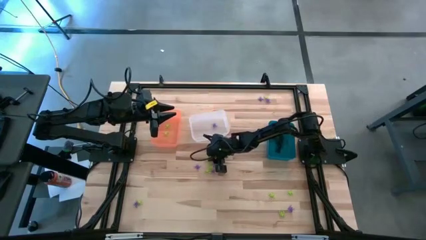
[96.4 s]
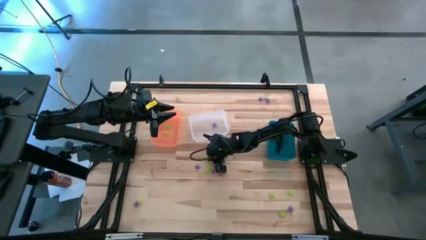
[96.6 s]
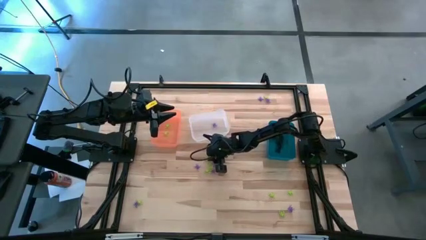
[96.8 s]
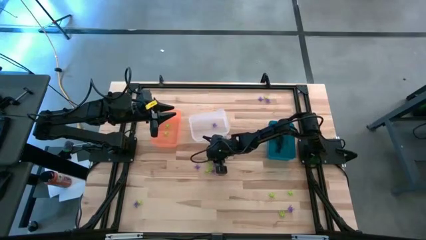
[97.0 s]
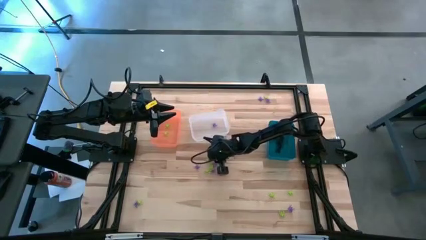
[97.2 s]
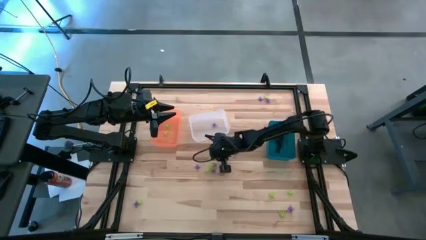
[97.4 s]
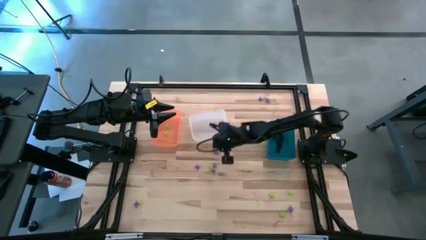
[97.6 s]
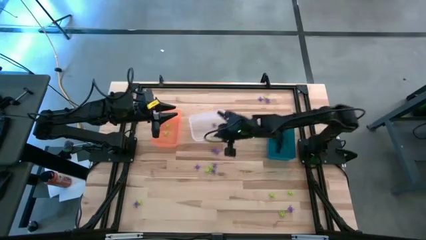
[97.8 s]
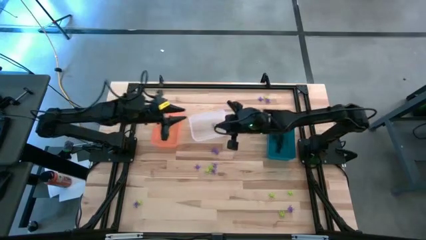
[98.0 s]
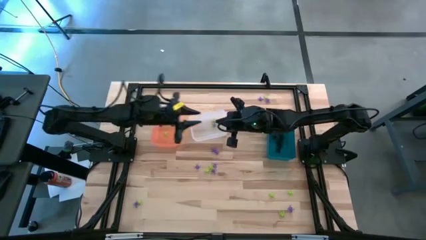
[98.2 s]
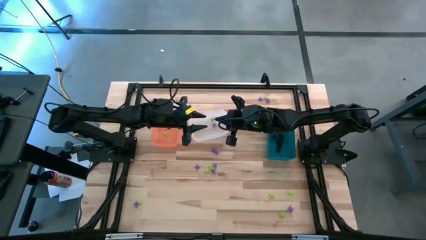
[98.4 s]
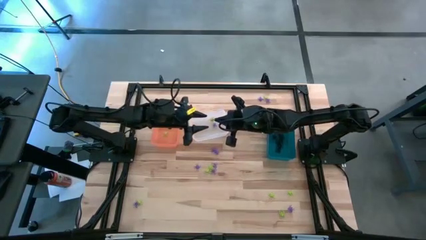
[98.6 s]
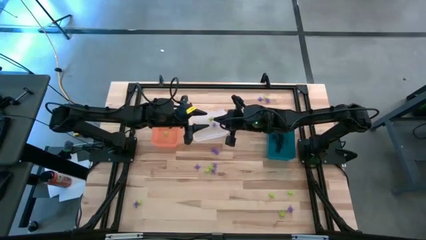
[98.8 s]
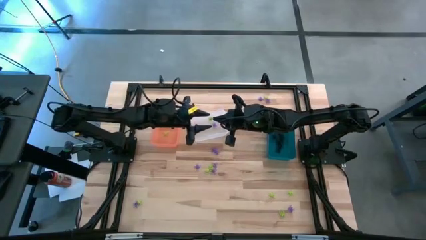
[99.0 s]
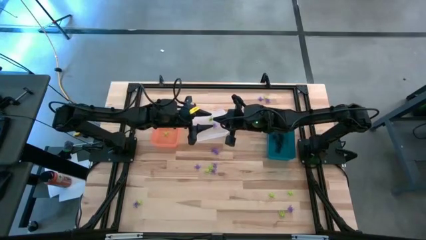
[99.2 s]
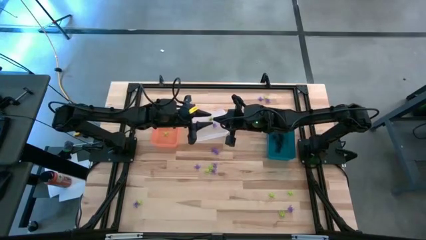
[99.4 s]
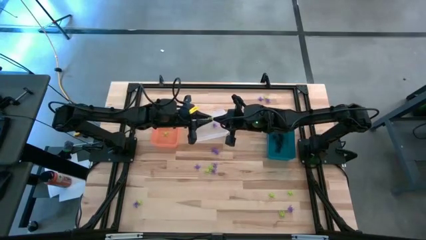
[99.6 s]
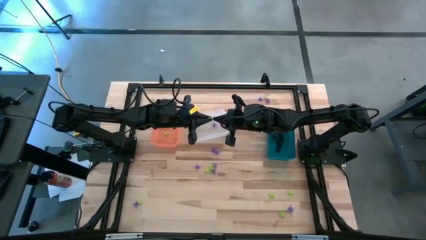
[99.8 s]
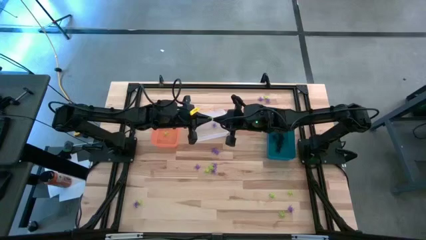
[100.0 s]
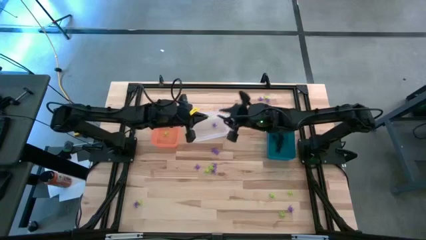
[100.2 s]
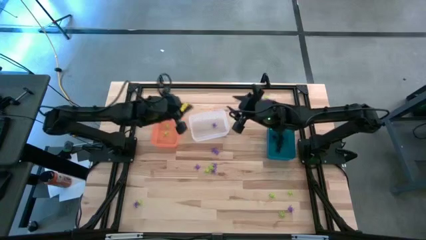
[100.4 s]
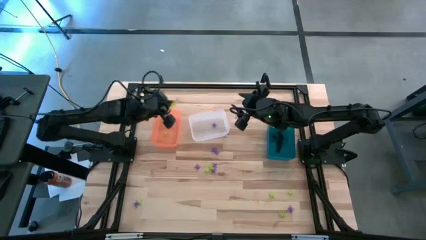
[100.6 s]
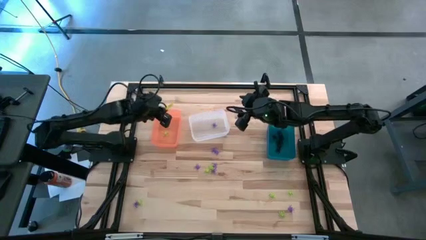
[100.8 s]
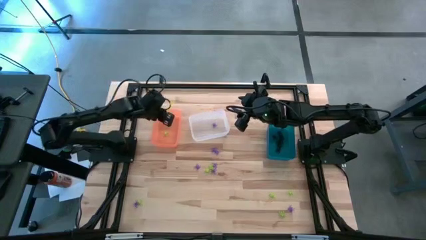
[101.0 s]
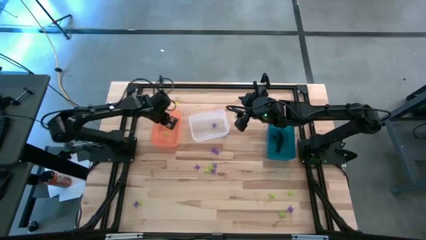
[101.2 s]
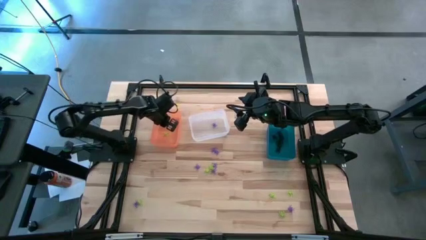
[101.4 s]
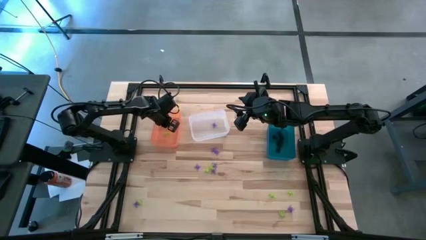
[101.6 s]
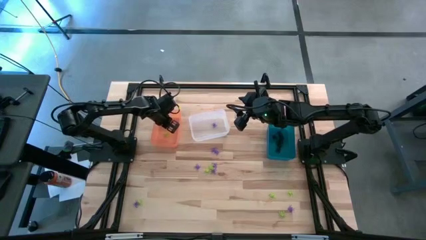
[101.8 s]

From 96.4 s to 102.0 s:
Task: Sort Halloween decoration
Put the green spider into the orange bin

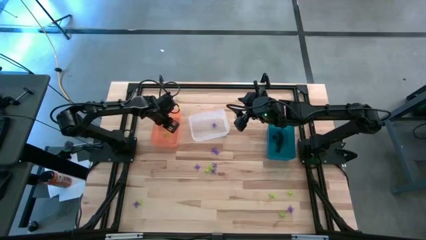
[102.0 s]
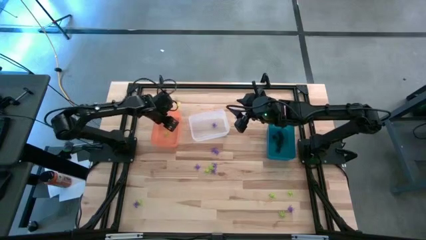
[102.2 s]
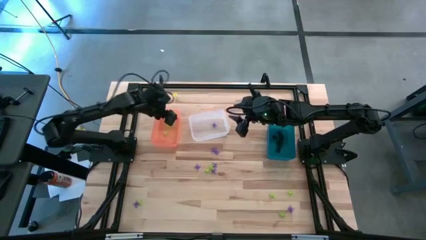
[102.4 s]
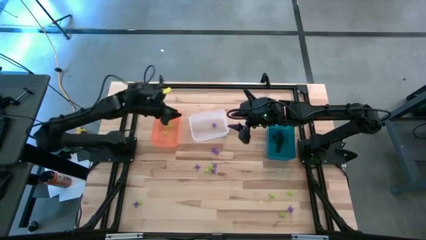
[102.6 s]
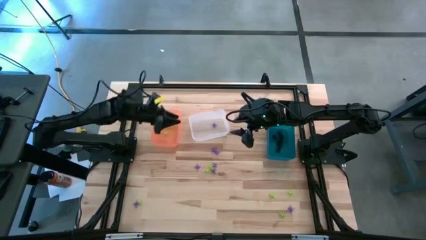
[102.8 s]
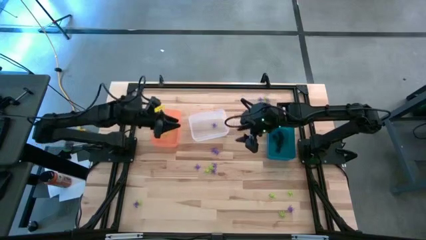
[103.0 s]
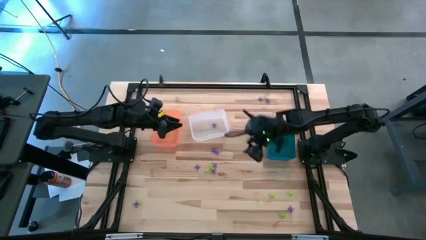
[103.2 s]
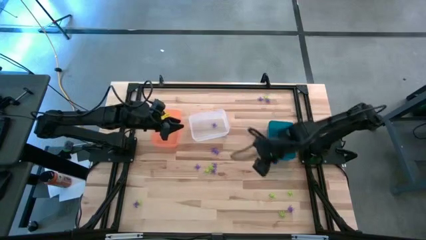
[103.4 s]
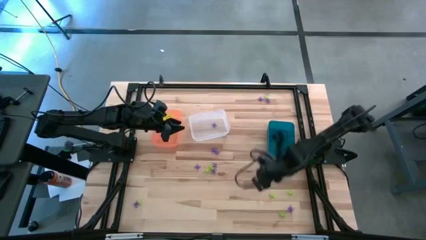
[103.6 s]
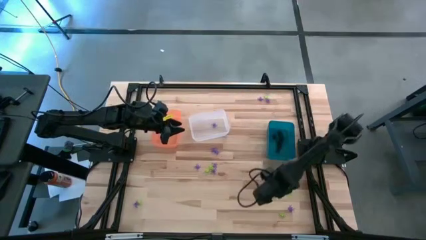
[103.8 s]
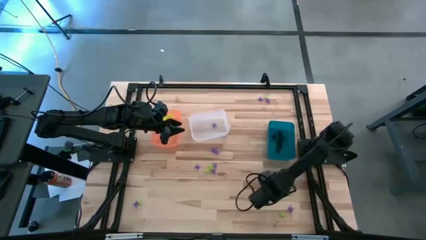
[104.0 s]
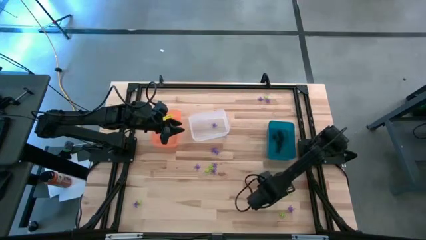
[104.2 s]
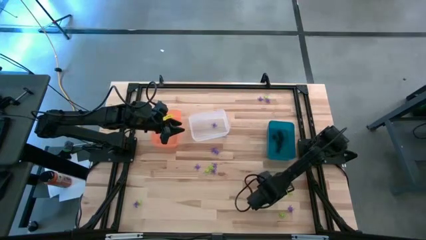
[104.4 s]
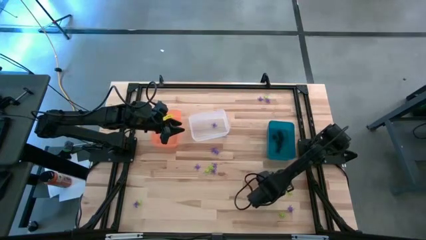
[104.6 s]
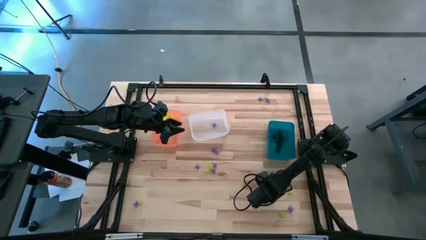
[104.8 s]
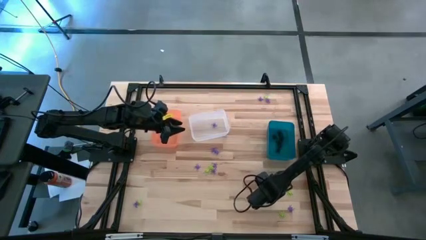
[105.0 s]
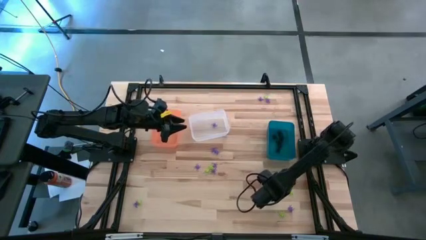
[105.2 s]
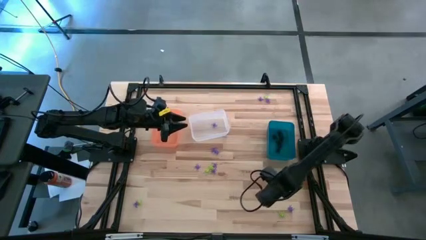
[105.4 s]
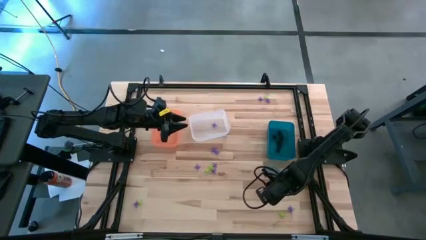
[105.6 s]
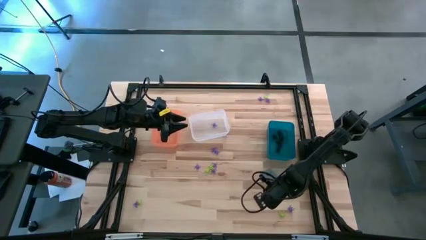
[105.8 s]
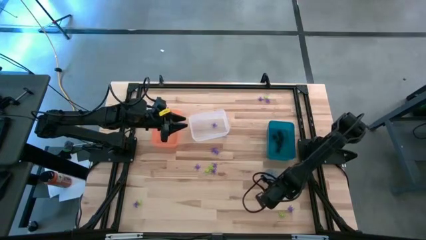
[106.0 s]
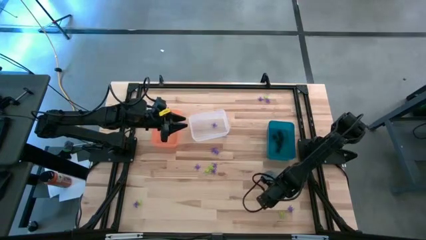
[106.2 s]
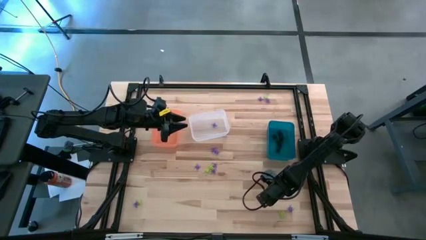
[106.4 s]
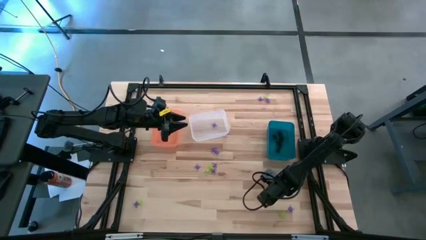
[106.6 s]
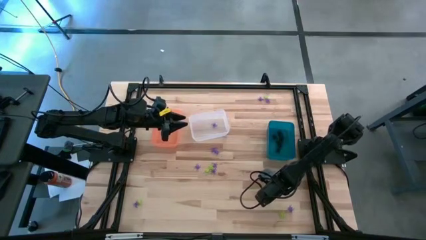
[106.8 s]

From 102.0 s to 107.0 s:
Put the green spider toy into the orange bin

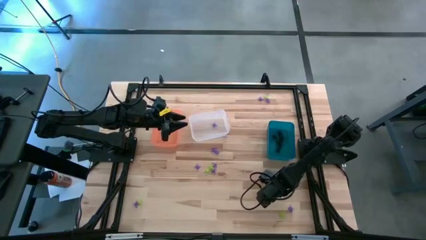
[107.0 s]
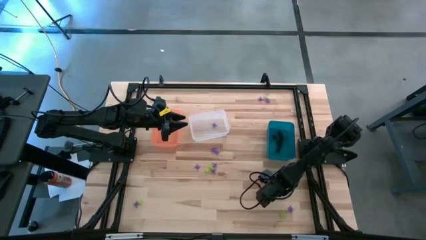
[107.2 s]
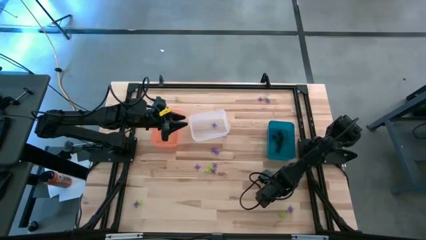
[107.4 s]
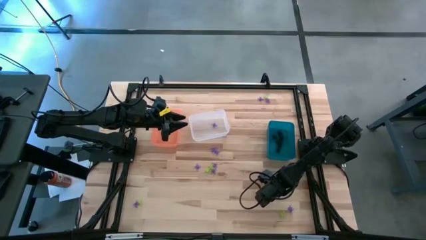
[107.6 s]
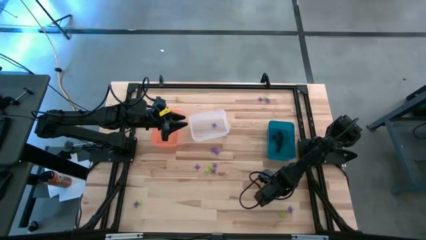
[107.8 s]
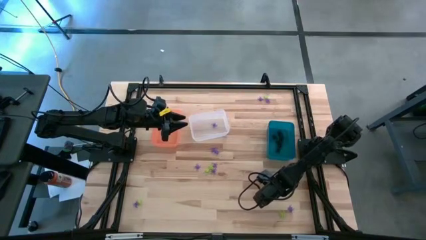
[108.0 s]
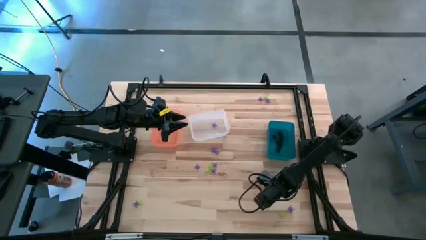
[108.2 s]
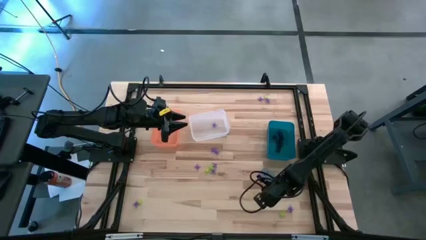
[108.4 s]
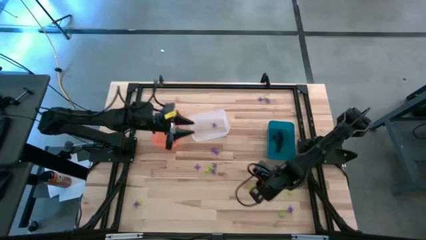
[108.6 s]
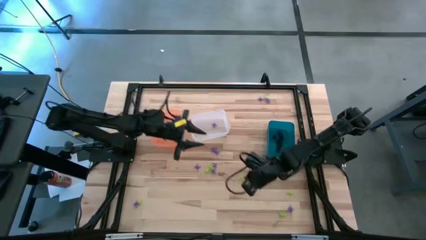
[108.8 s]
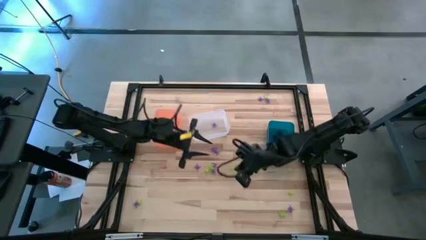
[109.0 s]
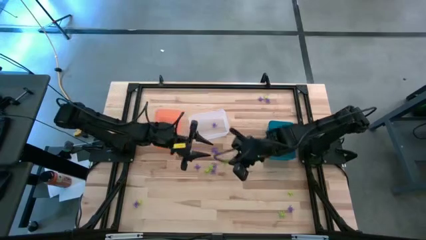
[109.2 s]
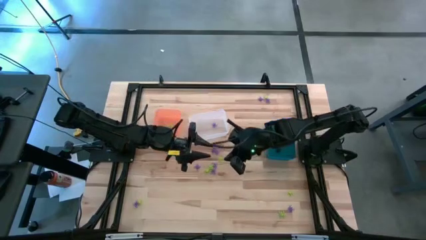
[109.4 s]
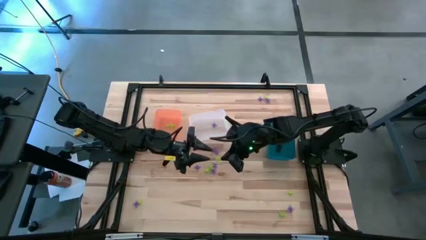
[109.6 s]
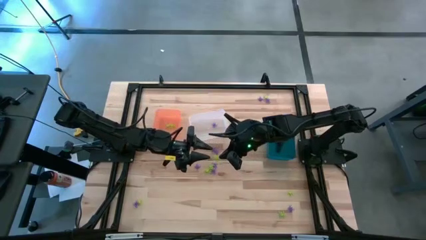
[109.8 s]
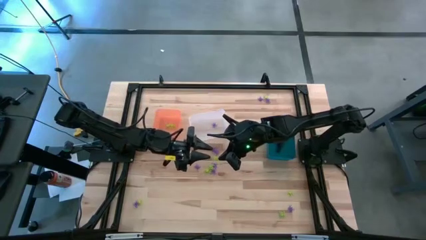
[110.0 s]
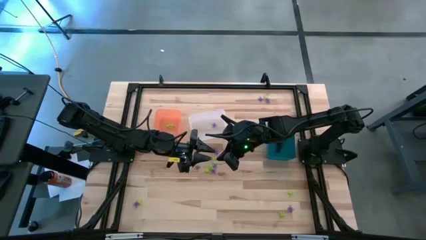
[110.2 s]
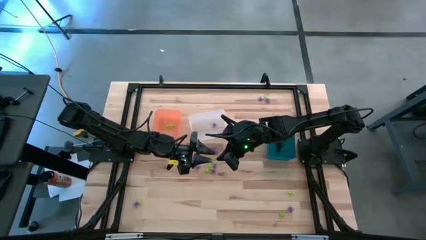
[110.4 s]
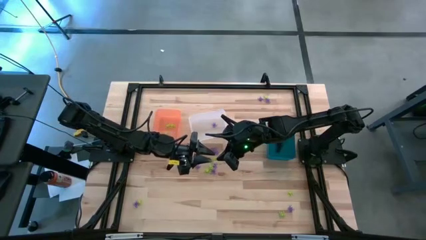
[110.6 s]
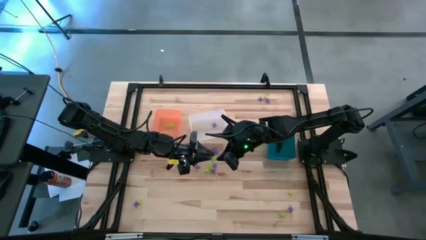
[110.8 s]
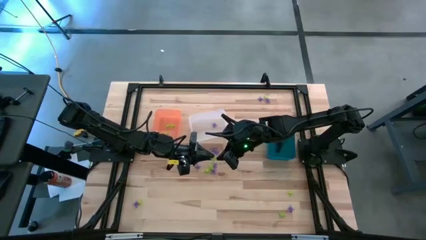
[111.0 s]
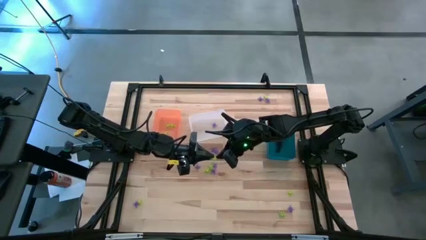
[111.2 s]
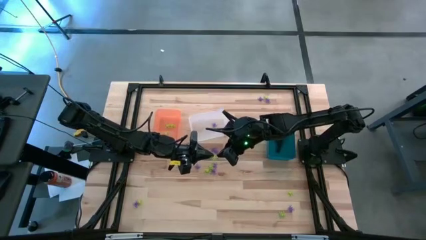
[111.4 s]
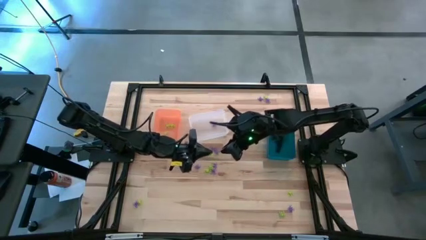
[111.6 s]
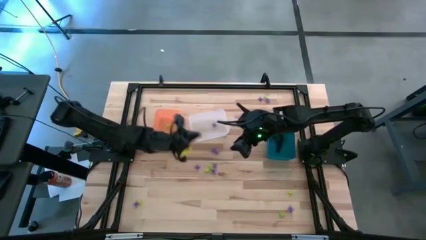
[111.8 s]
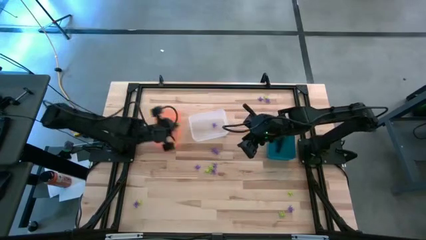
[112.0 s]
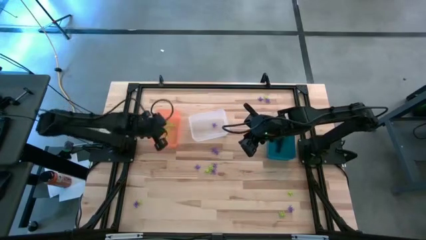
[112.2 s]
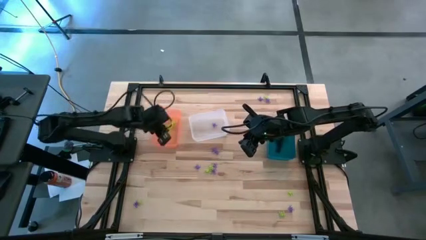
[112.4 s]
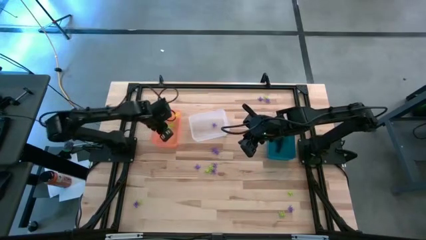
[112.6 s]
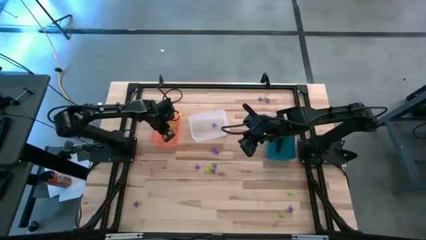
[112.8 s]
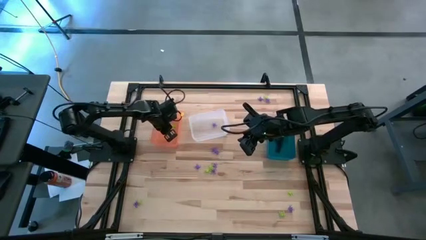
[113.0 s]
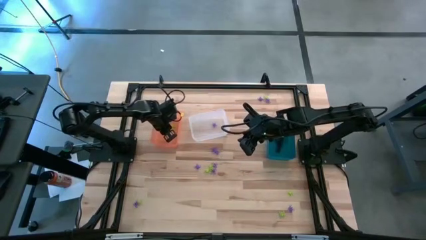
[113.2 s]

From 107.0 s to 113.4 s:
Put the green spider toy into the orange bin
